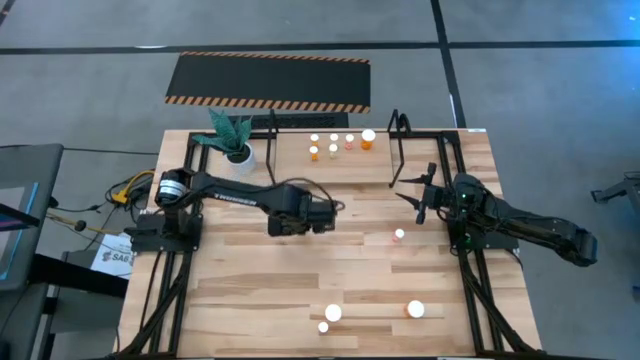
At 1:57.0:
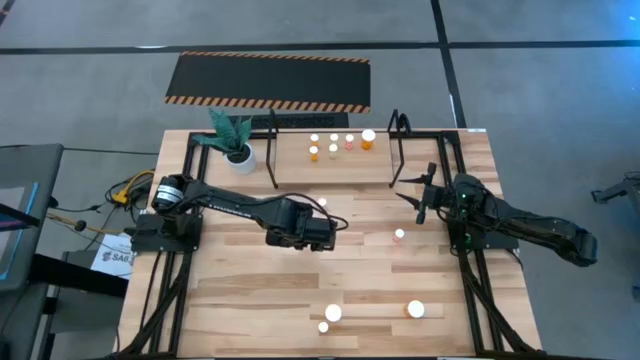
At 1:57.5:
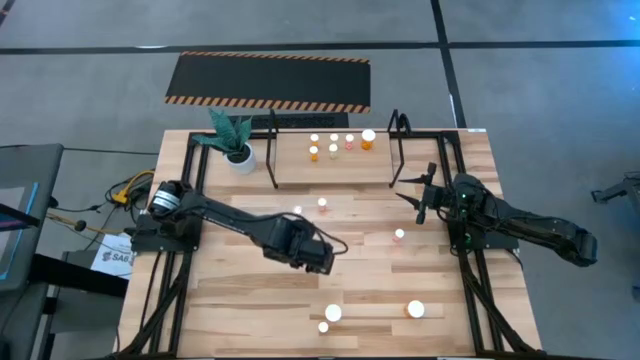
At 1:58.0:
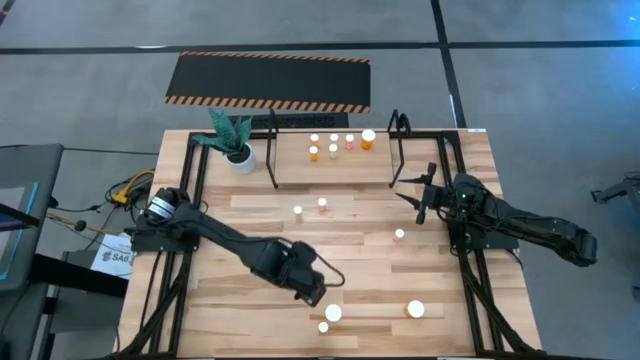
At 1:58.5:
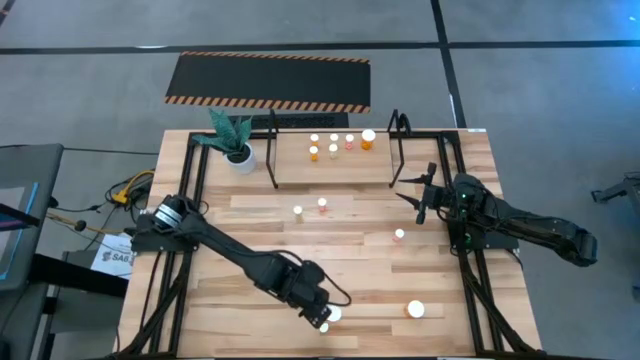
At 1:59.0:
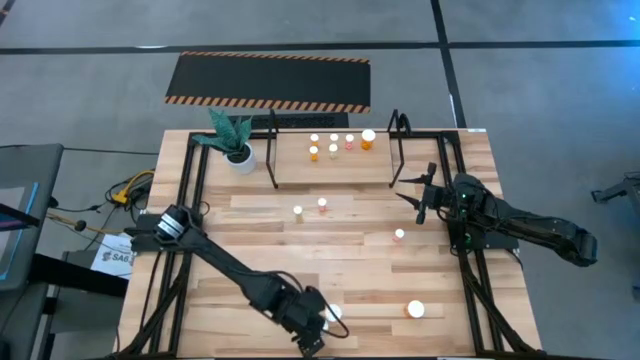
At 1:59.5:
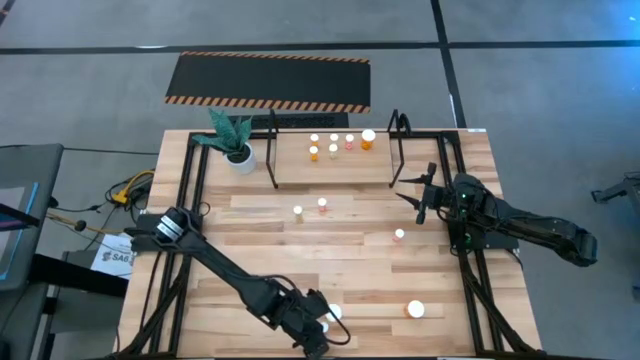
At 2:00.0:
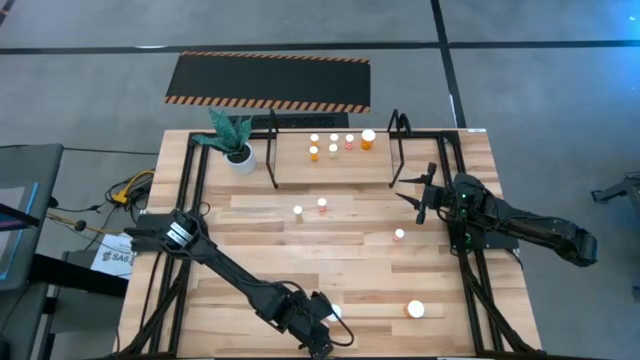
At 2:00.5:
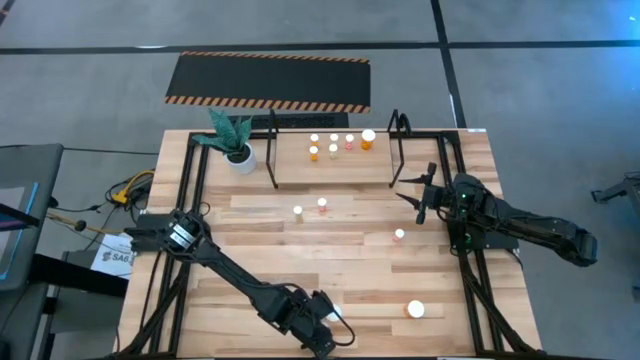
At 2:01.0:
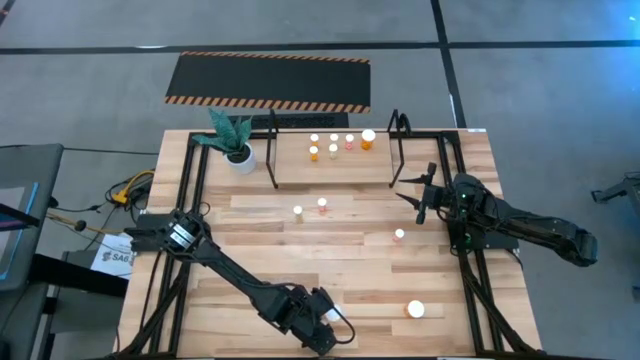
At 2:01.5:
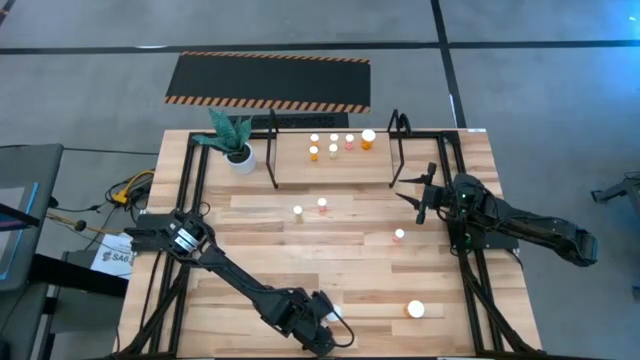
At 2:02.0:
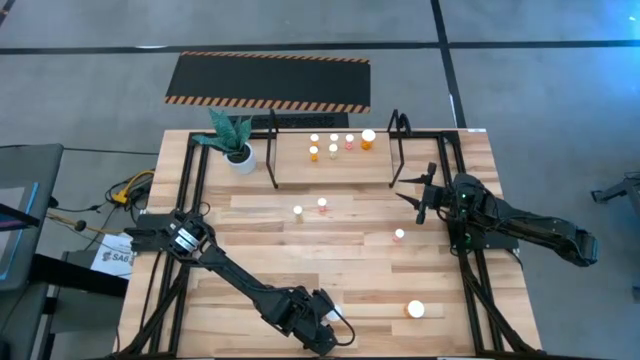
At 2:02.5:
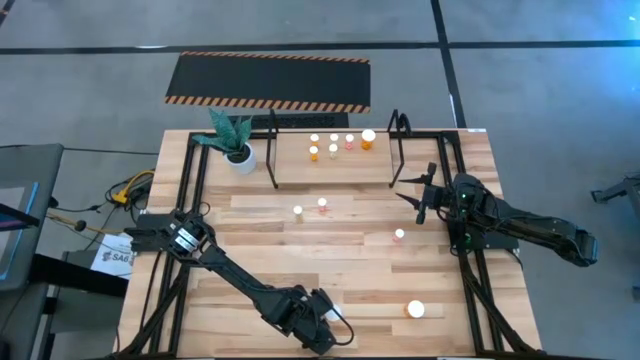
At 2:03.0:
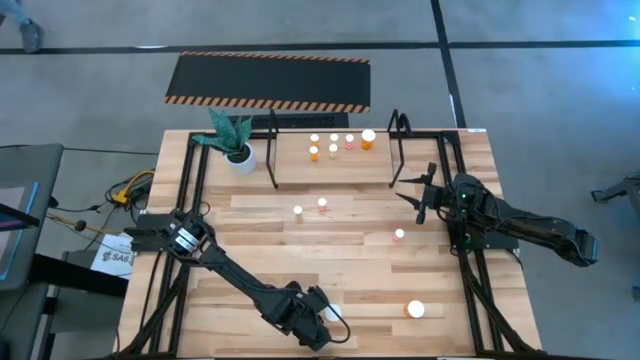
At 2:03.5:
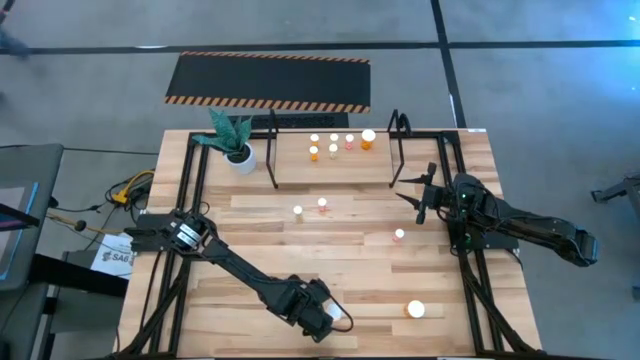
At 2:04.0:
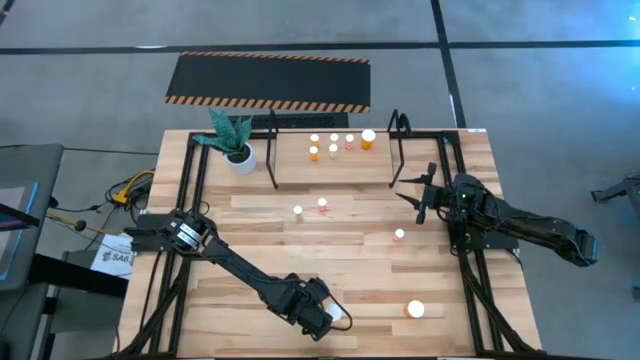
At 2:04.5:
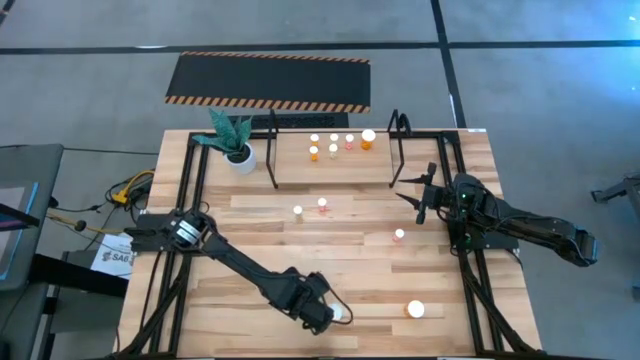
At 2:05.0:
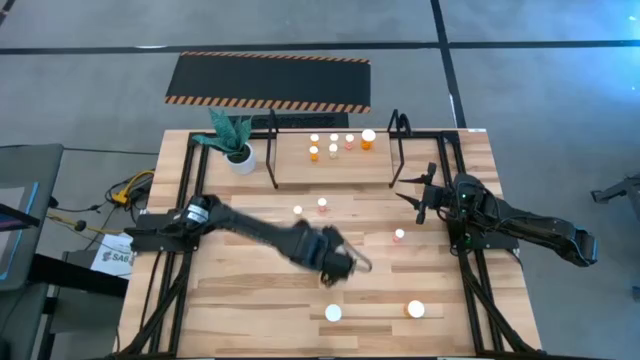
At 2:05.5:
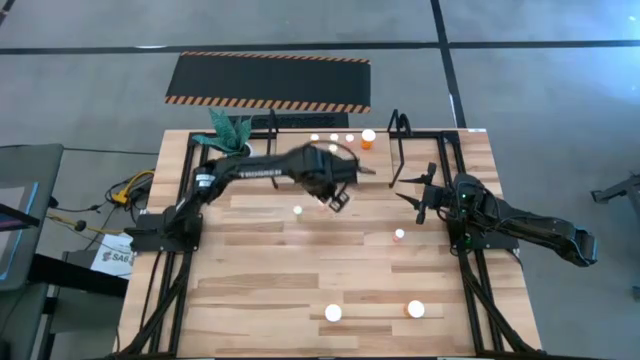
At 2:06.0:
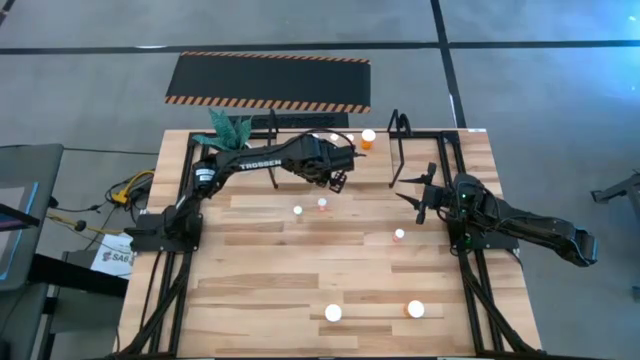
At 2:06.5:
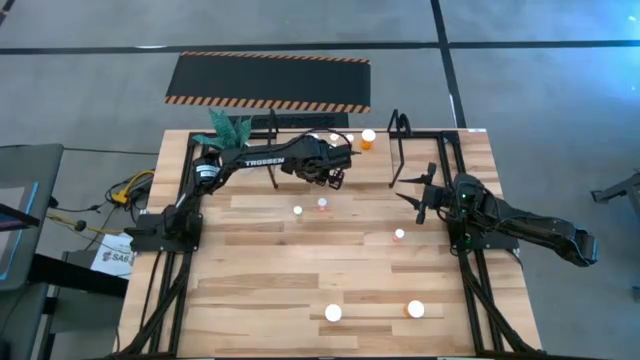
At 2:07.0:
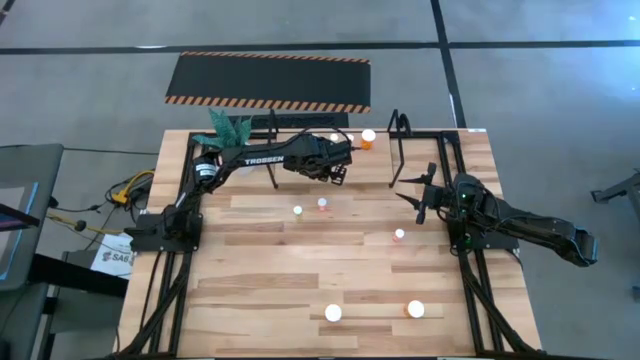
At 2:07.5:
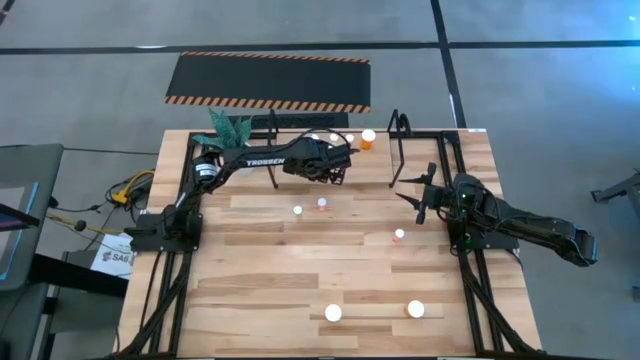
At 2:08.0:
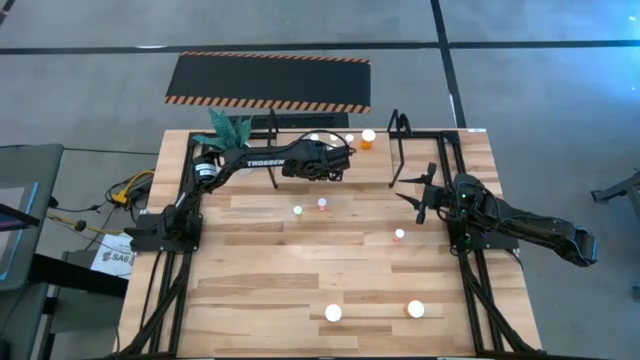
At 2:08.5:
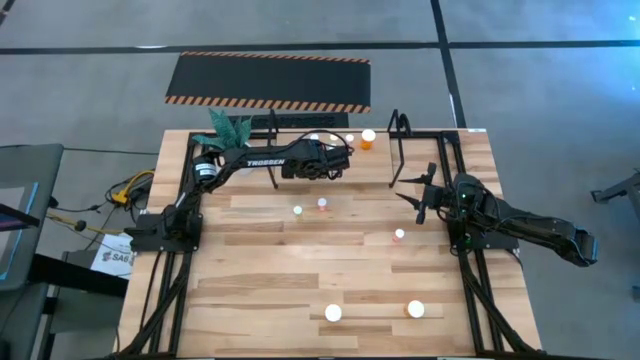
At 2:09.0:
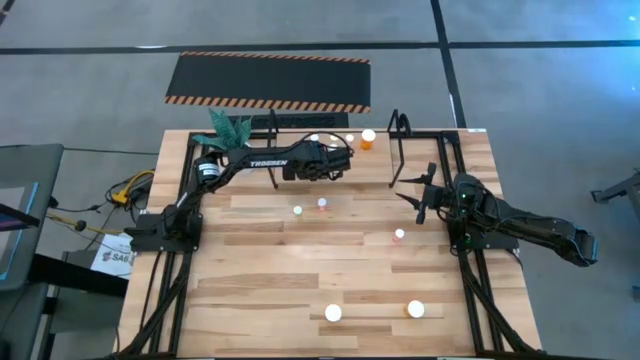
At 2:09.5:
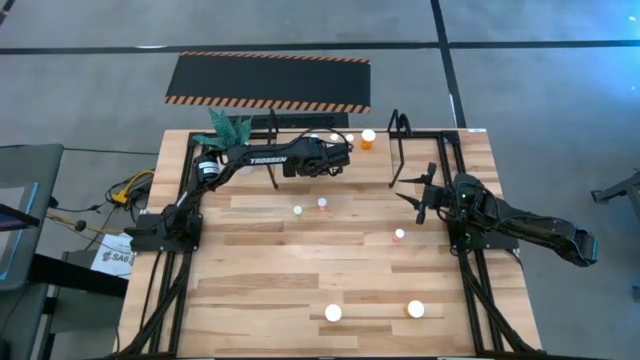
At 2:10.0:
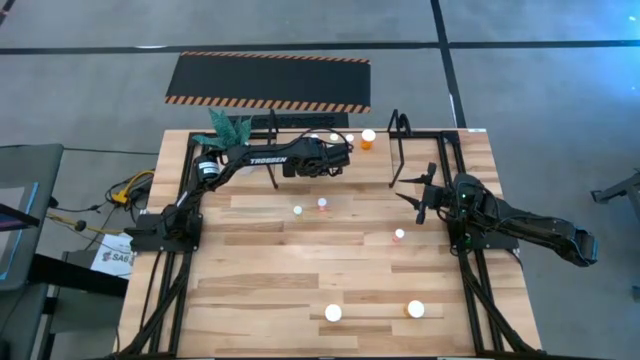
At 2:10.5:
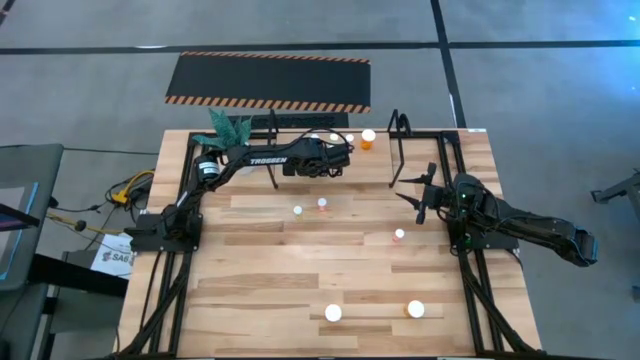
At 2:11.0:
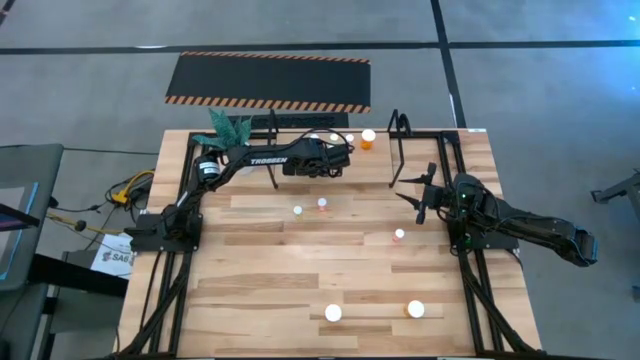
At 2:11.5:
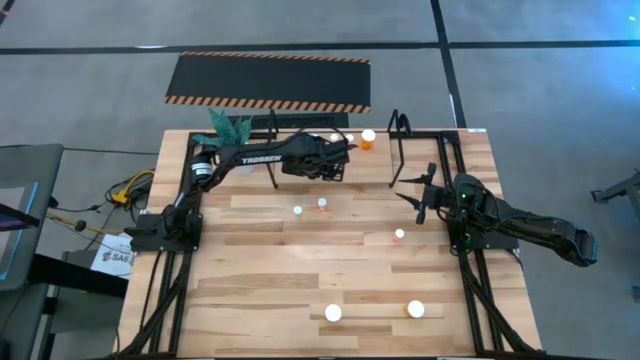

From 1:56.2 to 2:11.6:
Task: Pick and place medicine bottles onto shelf by color
Put the small orange pill bottle aligned with the other orange pill bottles on the shelf

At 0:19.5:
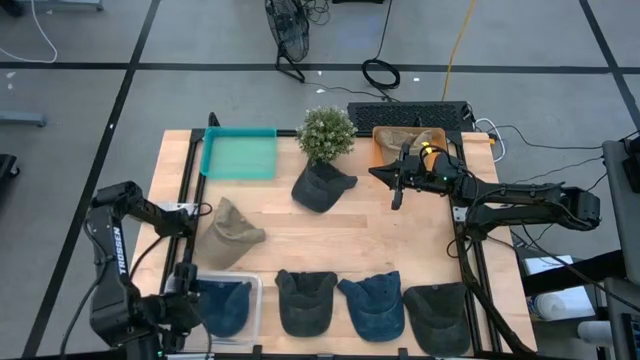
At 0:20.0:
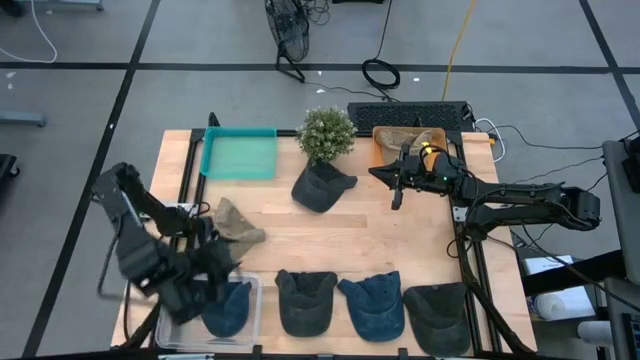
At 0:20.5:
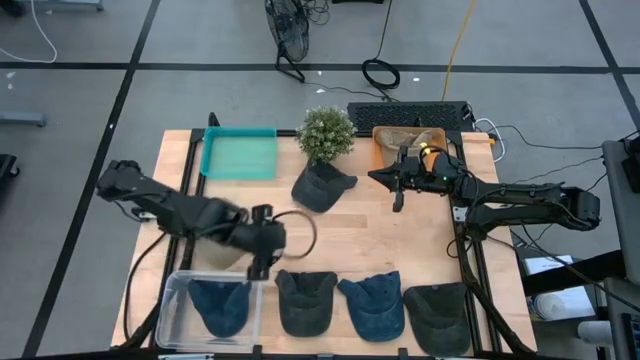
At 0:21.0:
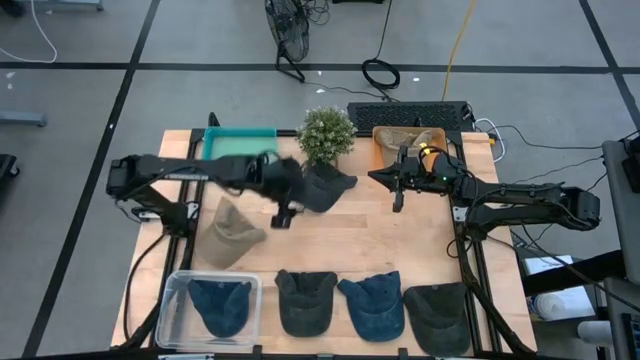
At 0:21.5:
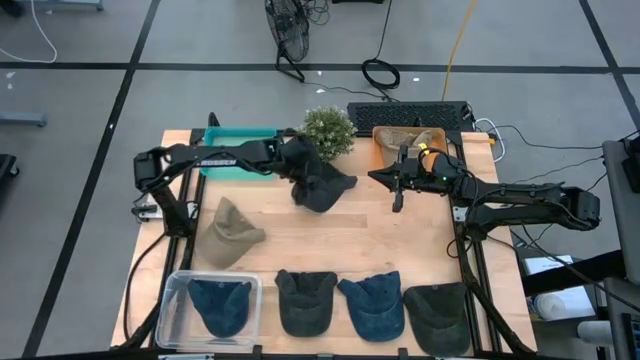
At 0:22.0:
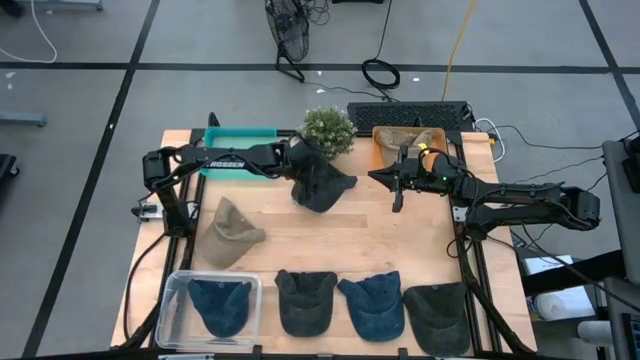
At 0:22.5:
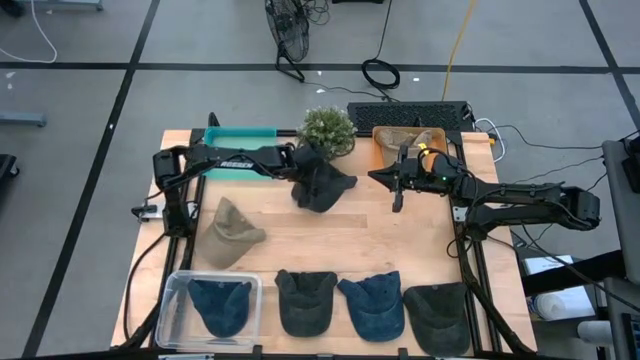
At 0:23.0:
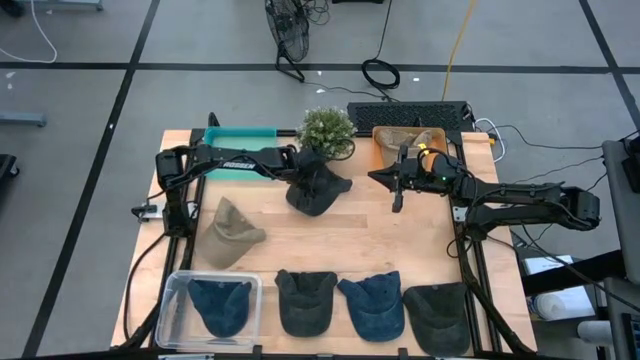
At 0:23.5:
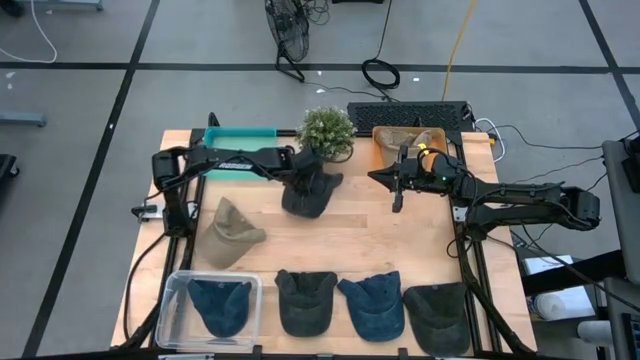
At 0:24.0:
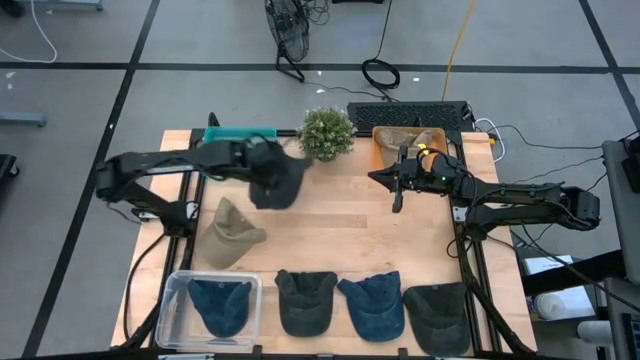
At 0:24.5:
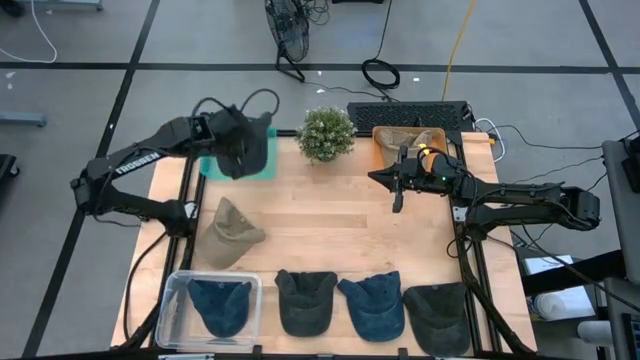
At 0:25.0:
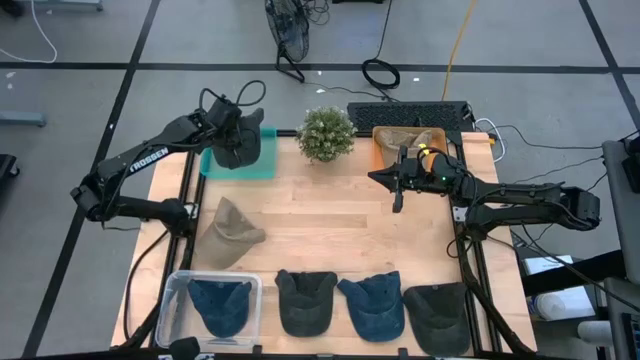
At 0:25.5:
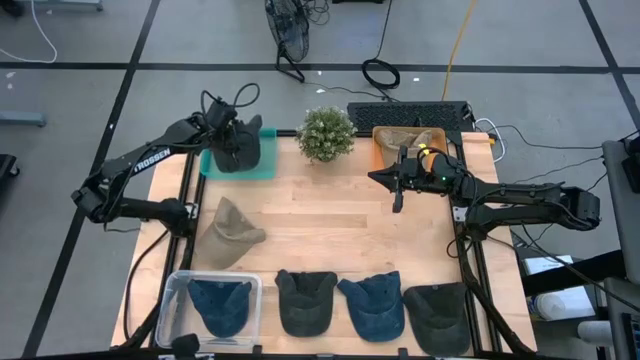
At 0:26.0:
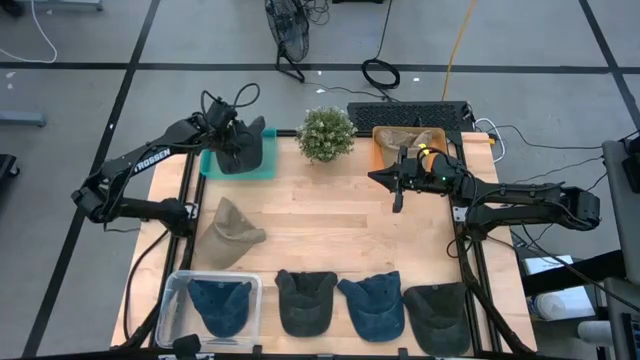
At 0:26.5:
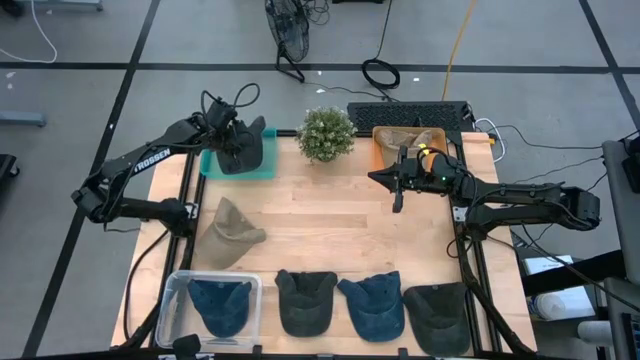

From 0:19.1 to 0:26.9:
Task: Pick & Place hat
Put the top black cap into the green bin
